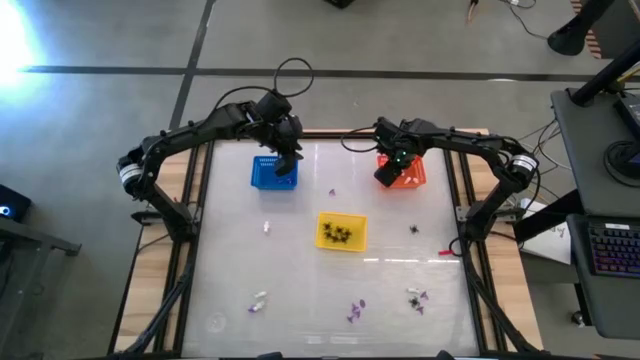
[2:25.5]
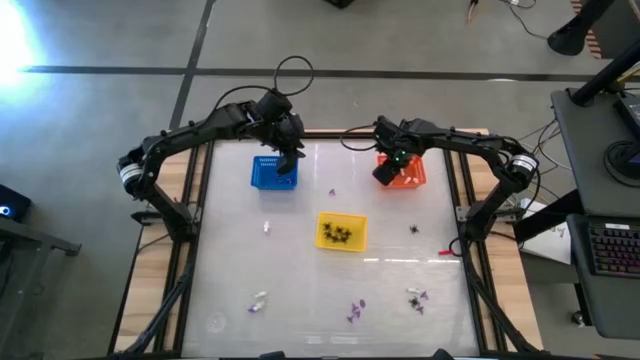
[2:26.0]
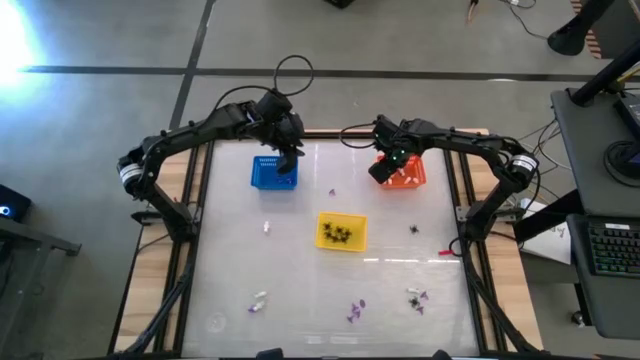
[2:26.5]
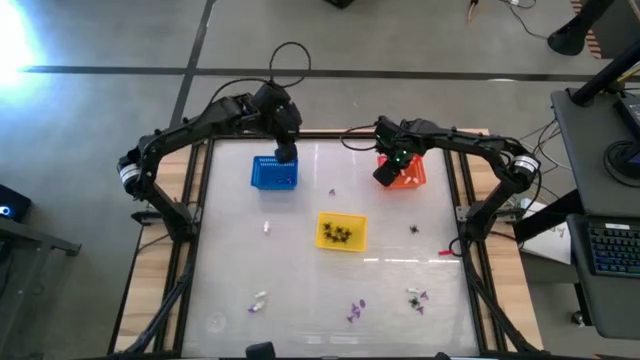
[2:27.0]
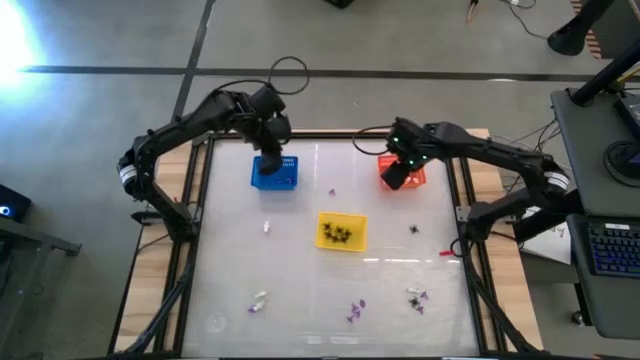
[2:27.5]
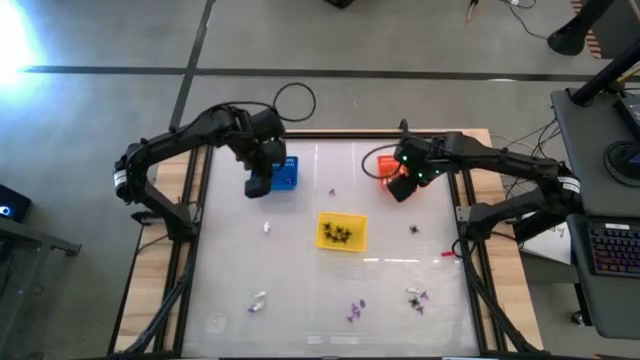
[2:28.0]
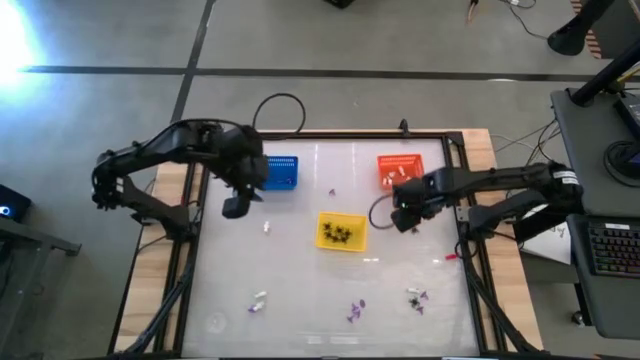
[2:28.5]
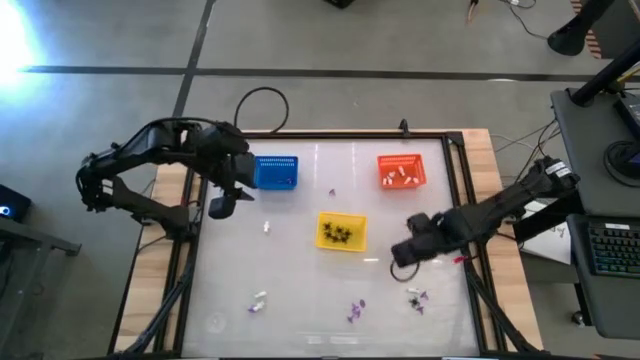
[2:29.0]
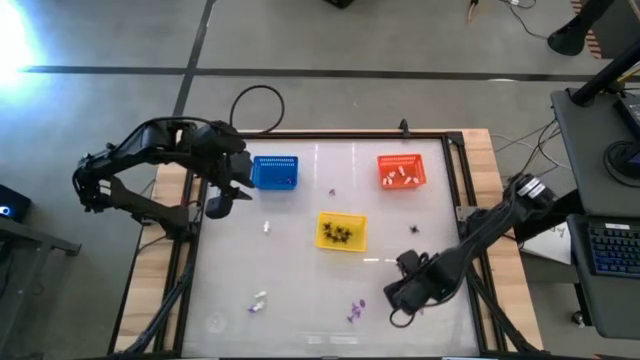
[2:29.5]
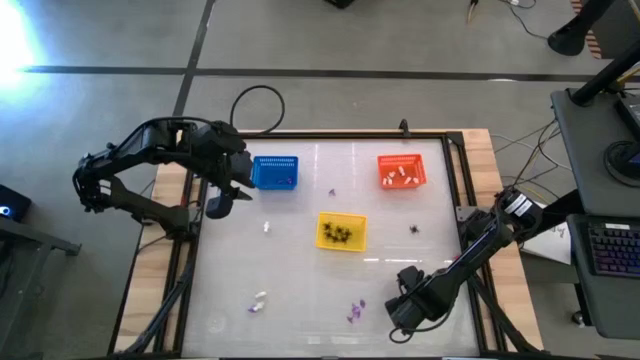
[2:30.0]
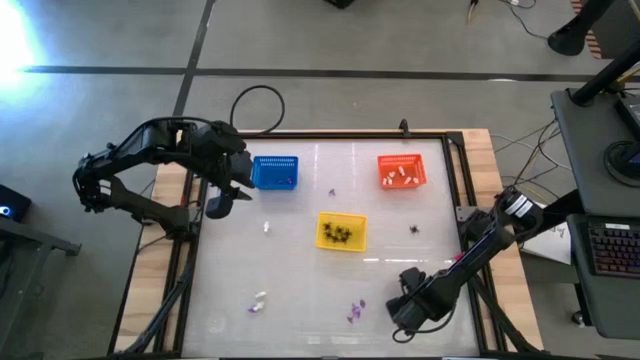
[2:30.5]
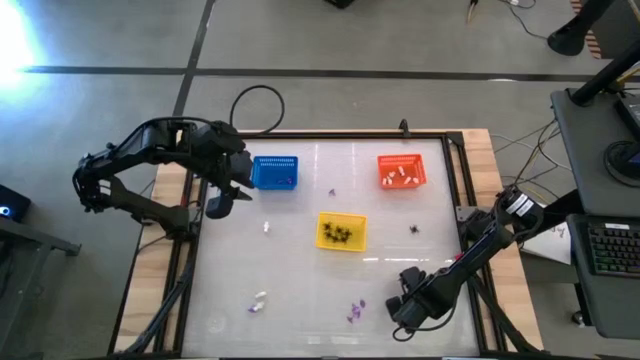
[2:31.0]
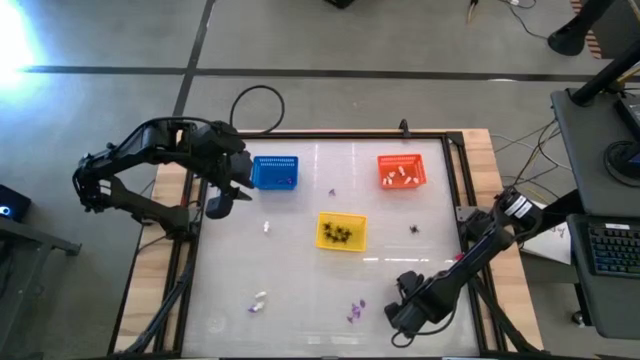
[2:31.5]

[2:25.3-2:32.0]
Task: Sort Halloween decoration
Put the black spider toy into the yellow bin

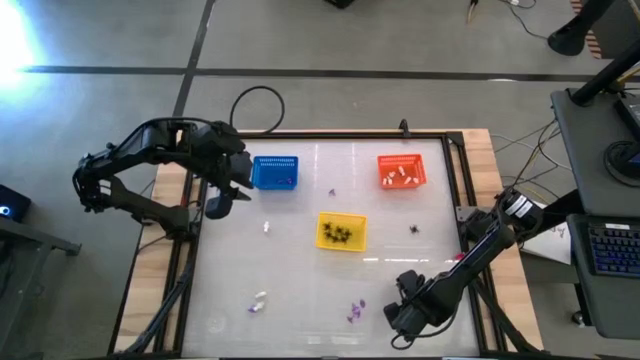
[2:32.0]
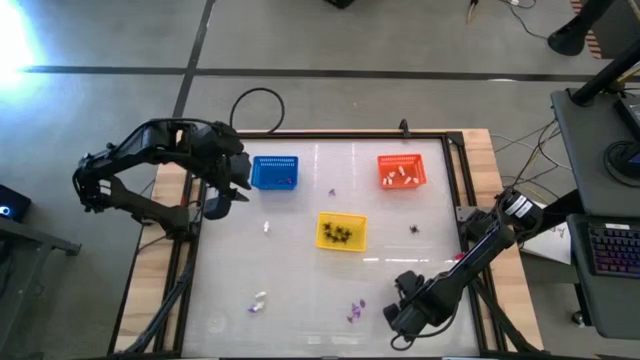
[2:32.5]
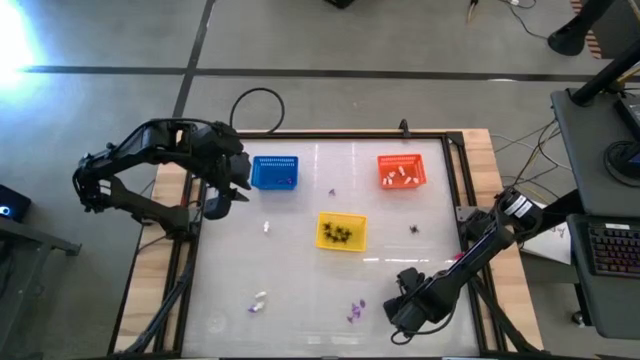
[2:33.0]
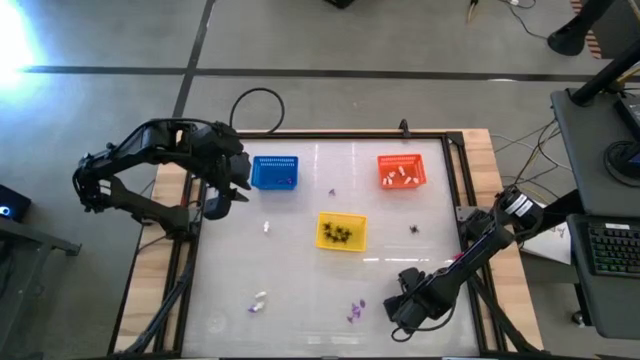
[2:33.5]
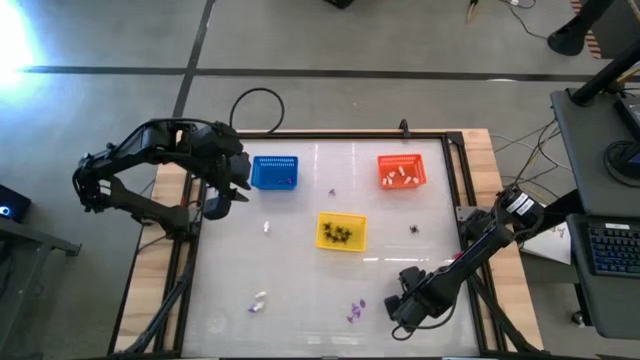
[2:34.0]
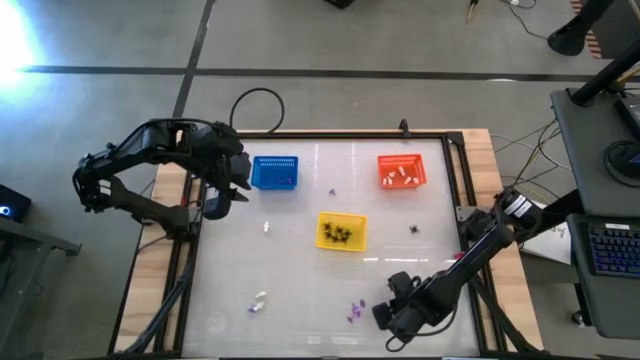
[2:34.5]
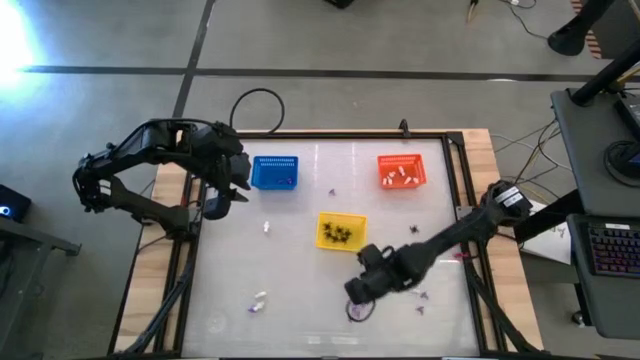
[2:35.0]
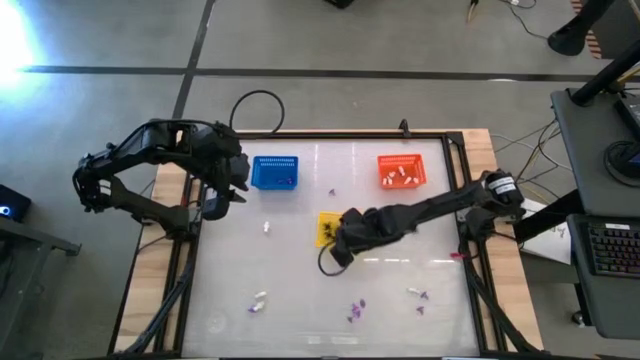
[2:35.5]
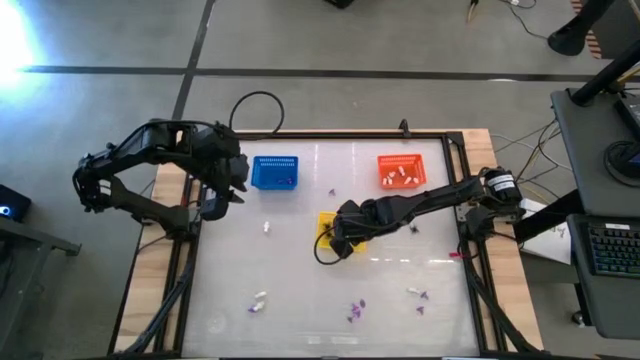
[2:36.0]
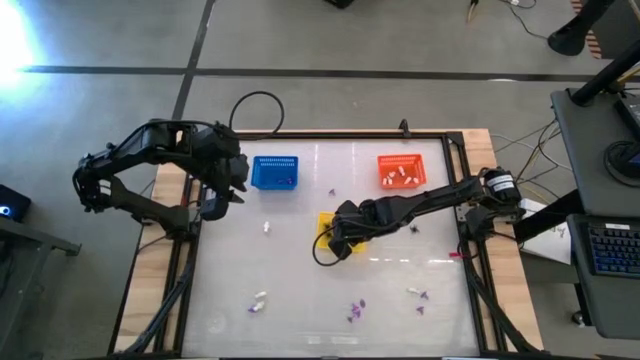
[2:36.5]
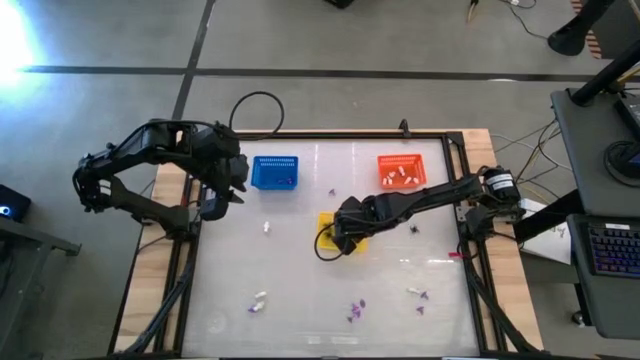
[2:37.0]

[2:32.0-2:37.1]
Put the black spider toy into the yellow bin

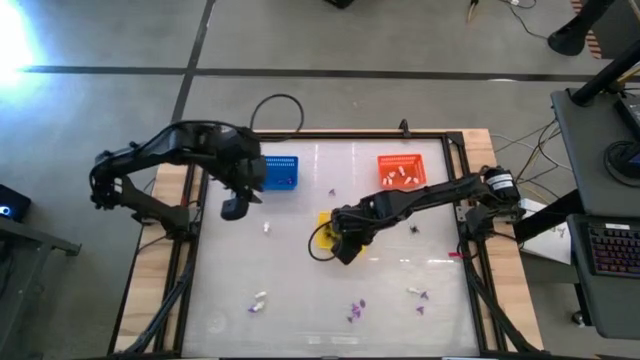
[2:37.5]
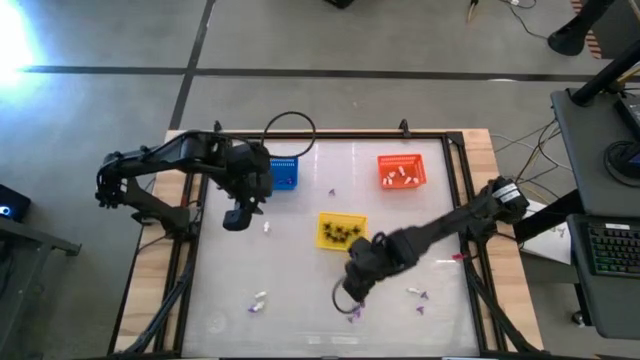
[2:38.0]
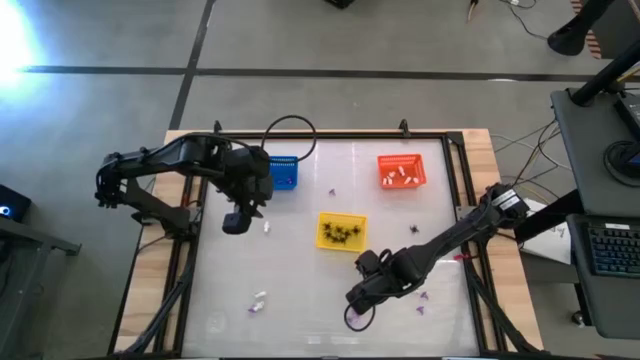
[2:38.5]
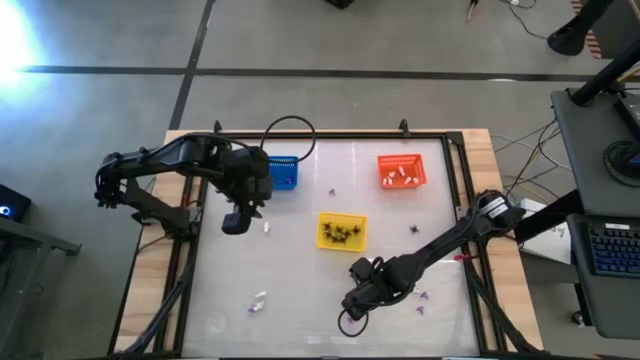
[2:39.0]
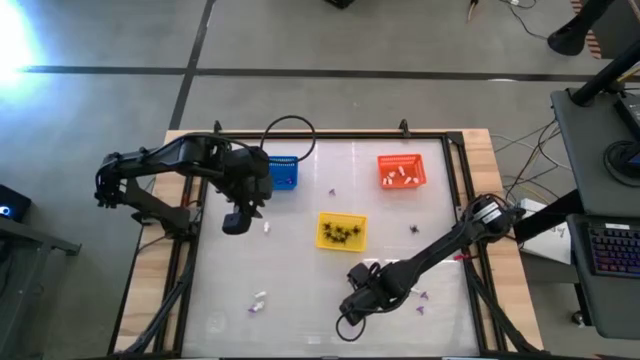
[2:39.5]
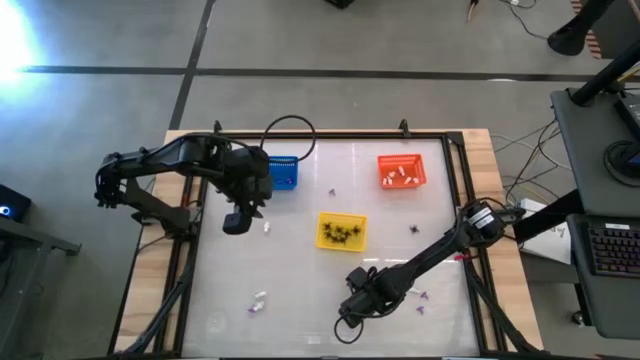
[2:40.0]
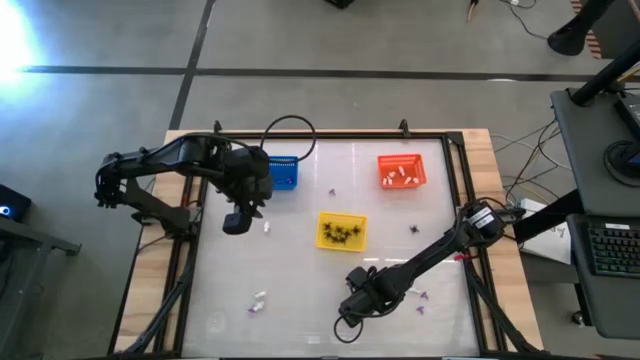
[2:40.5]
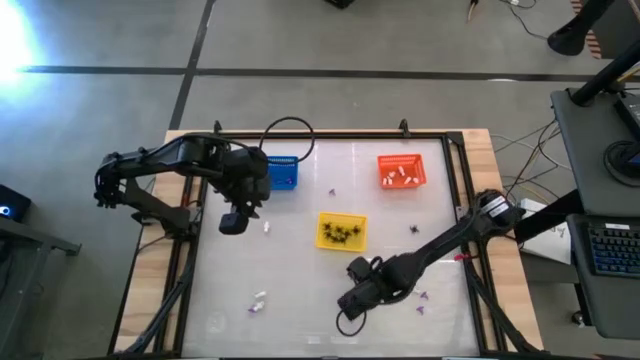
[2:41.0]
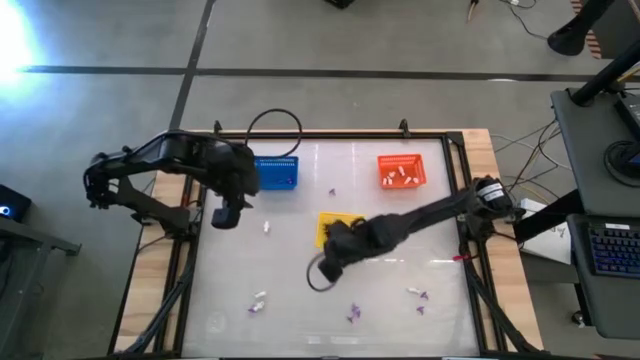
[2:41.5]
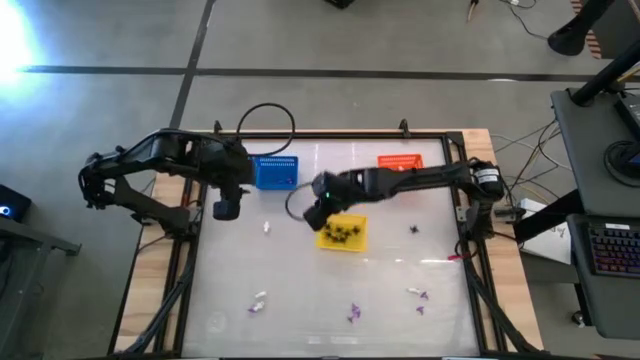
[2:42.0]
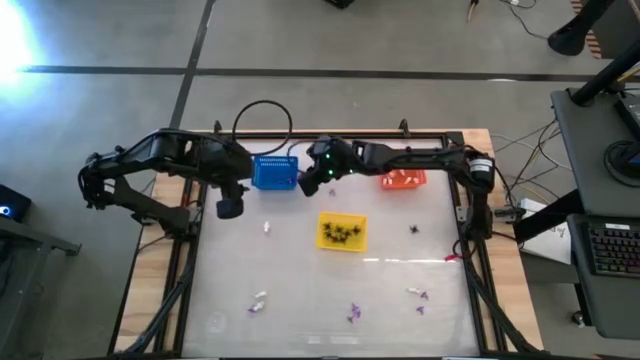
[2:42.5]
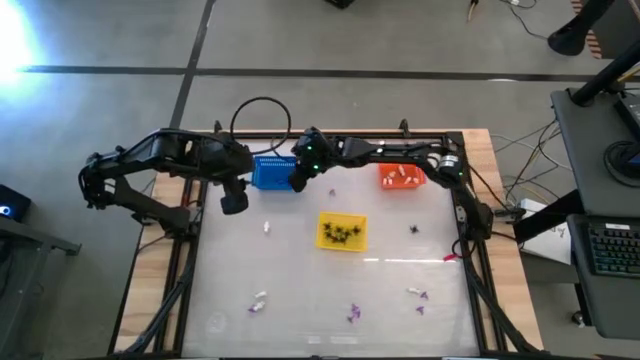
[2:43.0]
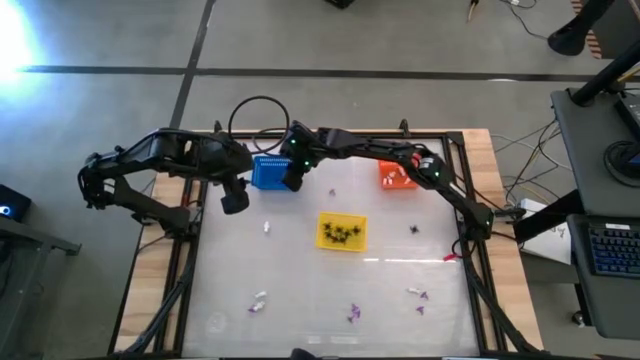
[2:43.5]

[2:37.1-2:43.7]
Put the purple witch hat toy into the blue bin

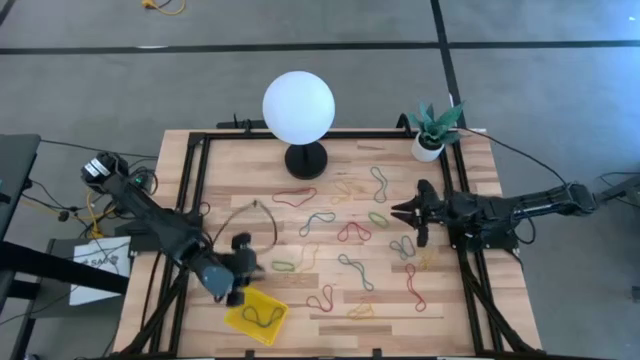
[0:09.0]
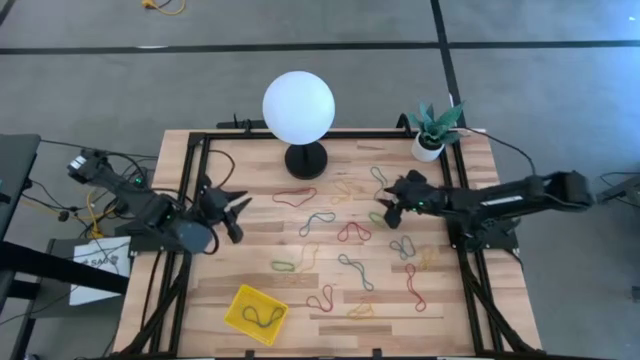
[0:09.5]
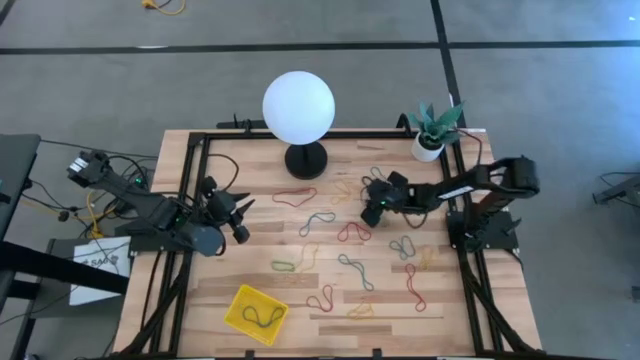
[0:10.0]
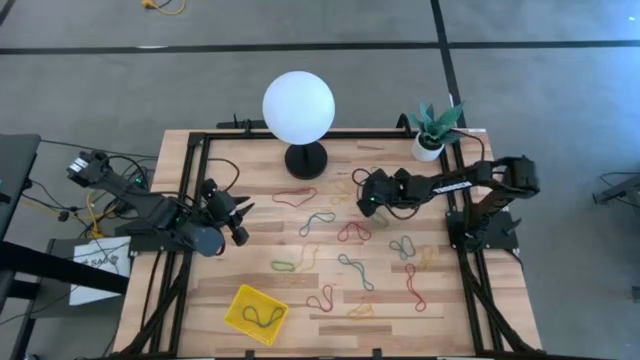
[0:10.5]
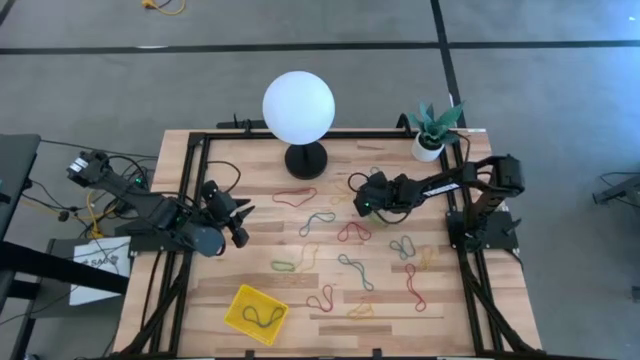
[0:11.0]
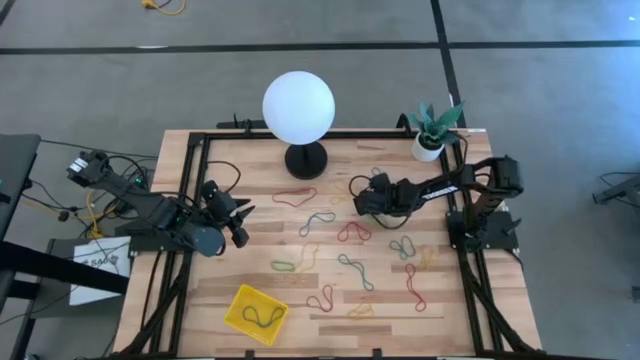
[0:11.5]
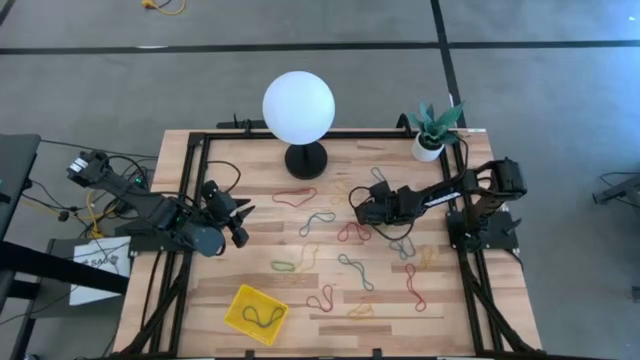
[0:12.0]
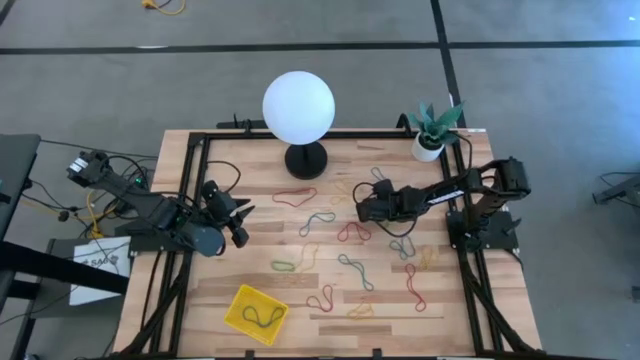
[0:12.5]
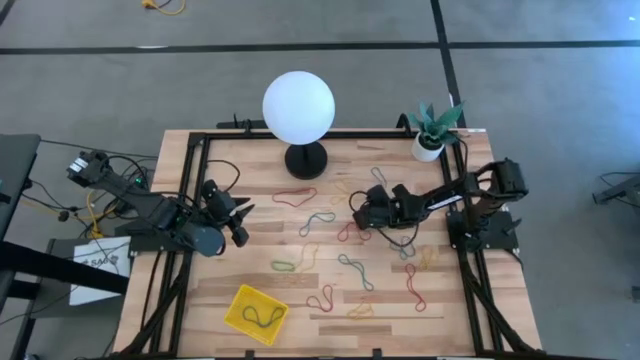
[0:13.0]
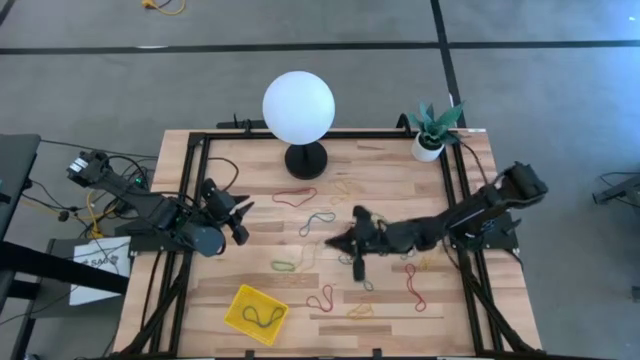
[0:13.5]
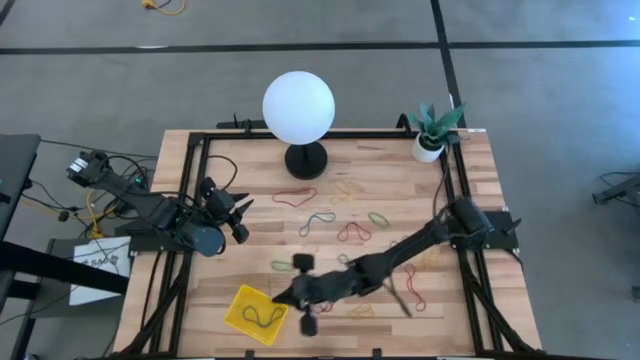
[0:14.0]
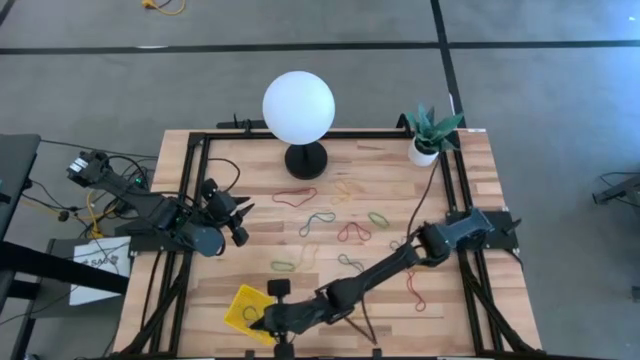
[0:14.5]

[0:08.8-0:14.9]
Task: Pick and place items into bin
Put the blue rubber band into the yellow bin
